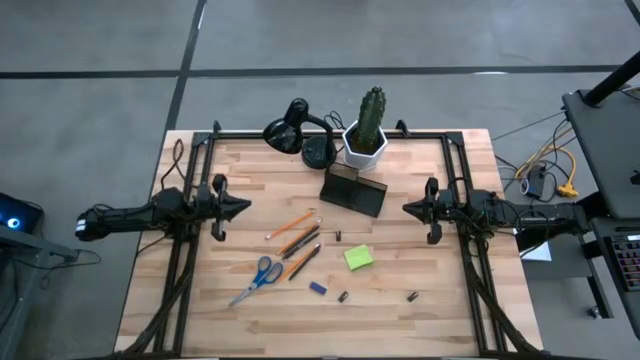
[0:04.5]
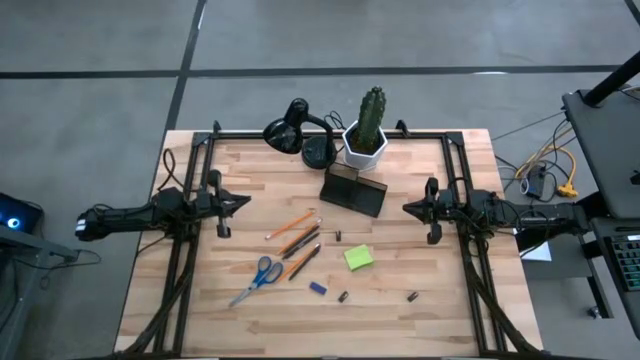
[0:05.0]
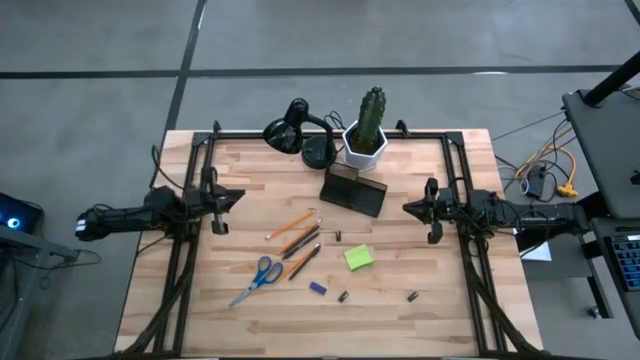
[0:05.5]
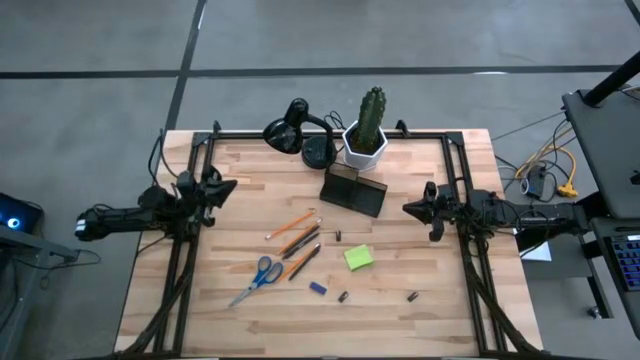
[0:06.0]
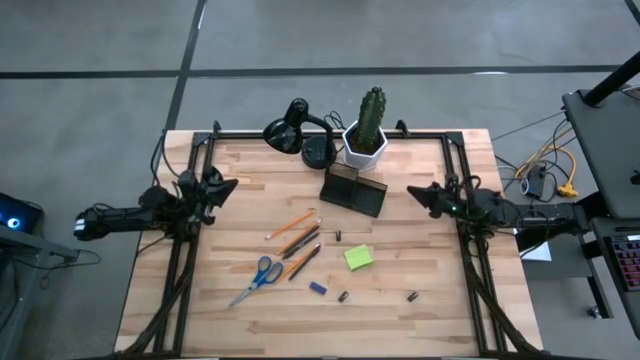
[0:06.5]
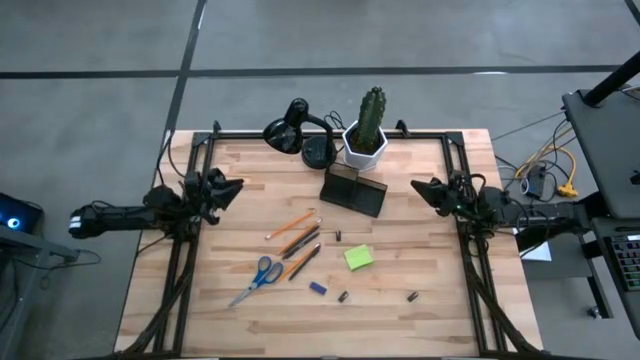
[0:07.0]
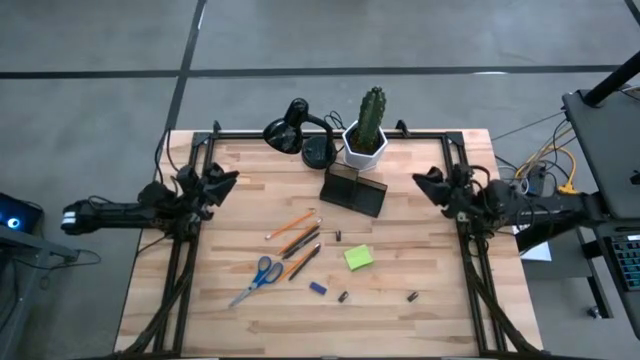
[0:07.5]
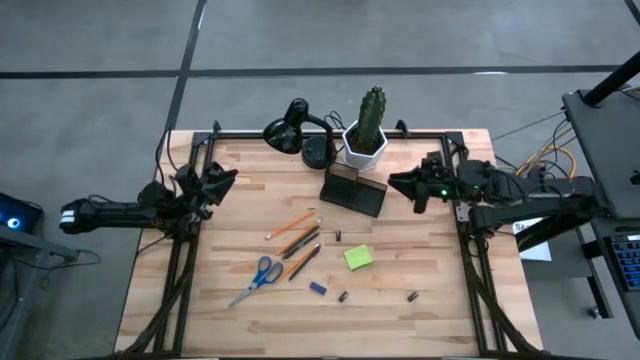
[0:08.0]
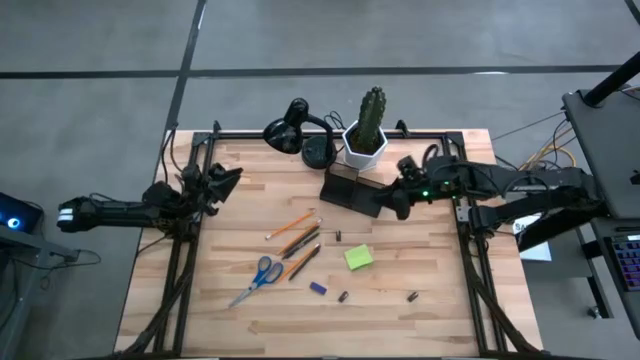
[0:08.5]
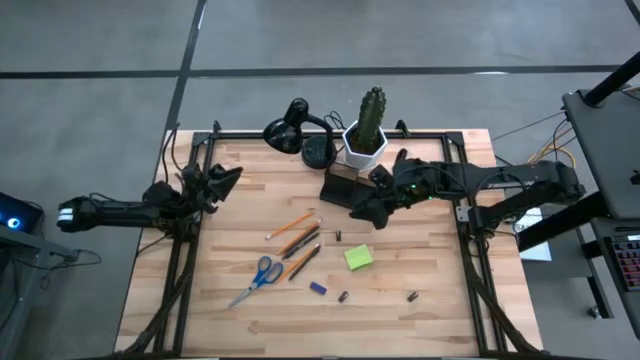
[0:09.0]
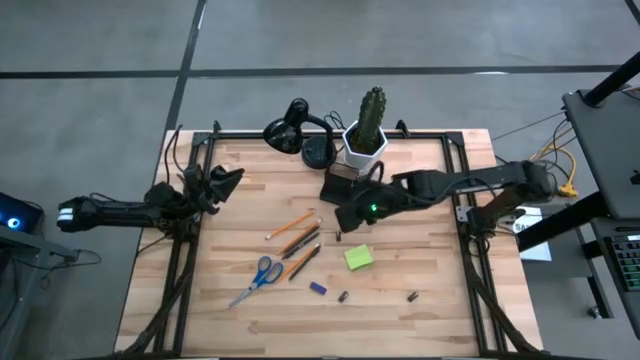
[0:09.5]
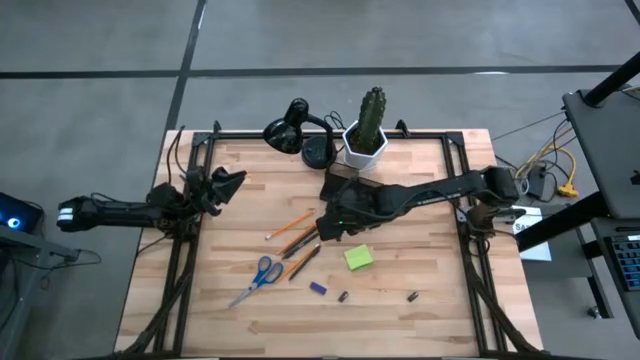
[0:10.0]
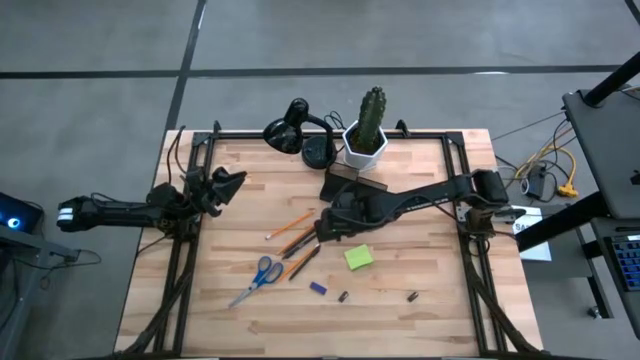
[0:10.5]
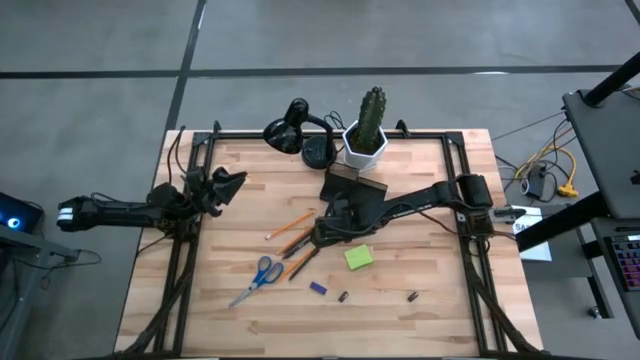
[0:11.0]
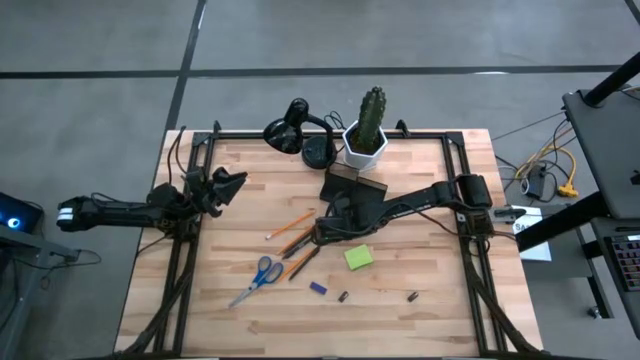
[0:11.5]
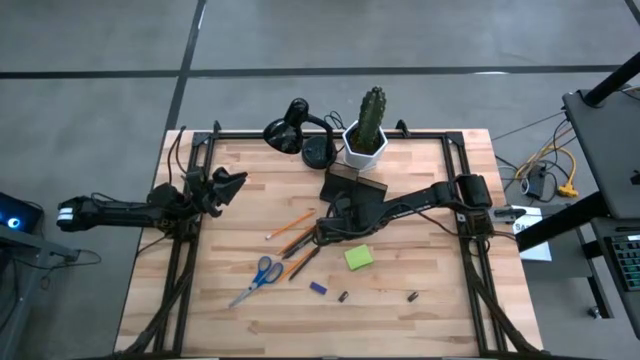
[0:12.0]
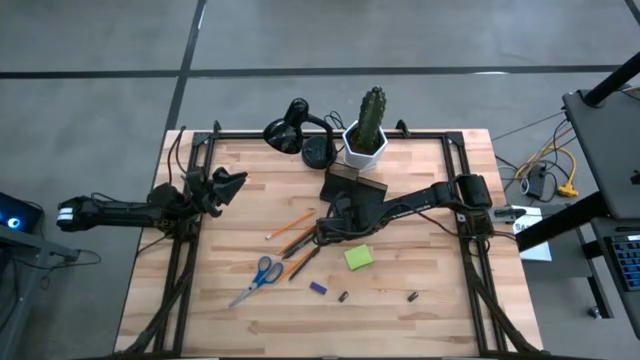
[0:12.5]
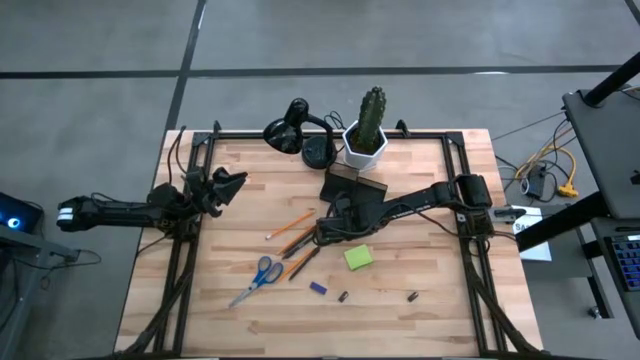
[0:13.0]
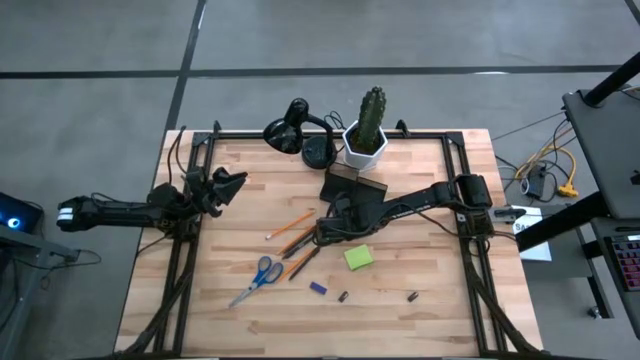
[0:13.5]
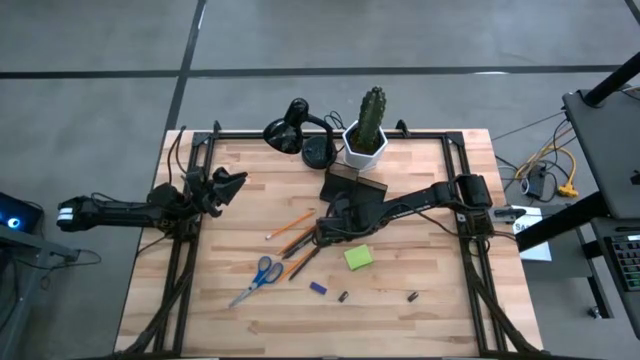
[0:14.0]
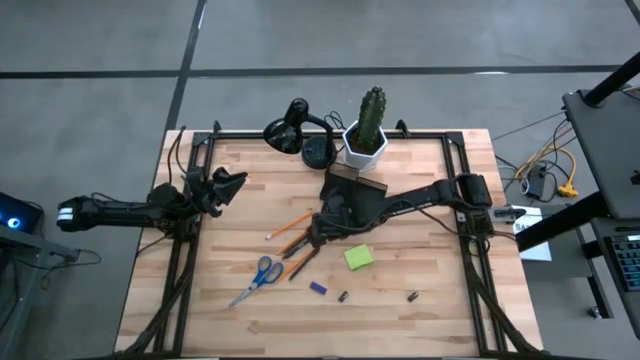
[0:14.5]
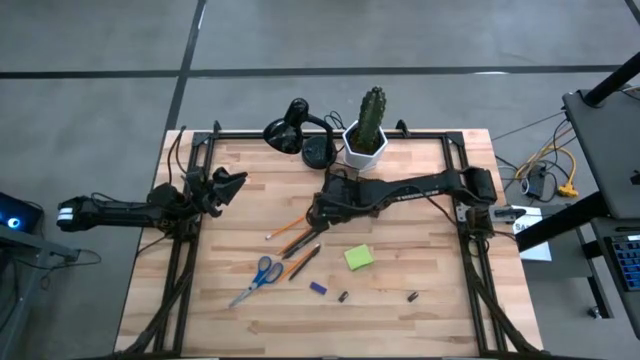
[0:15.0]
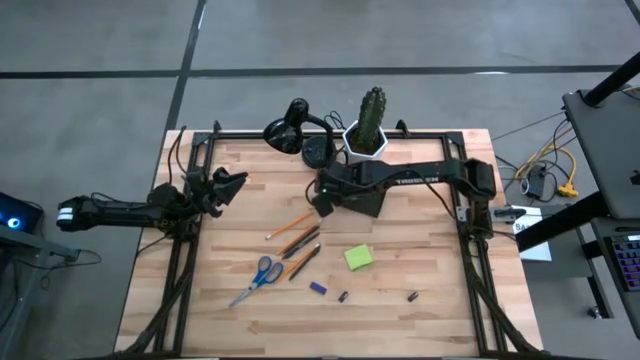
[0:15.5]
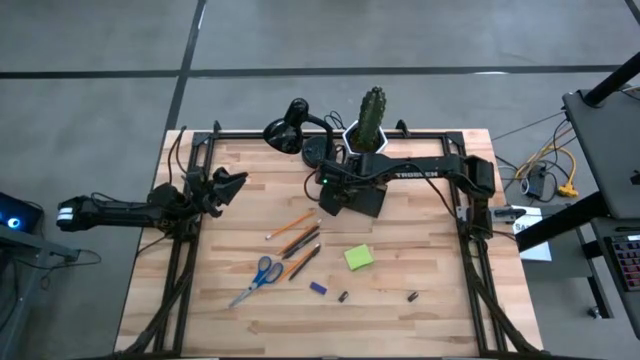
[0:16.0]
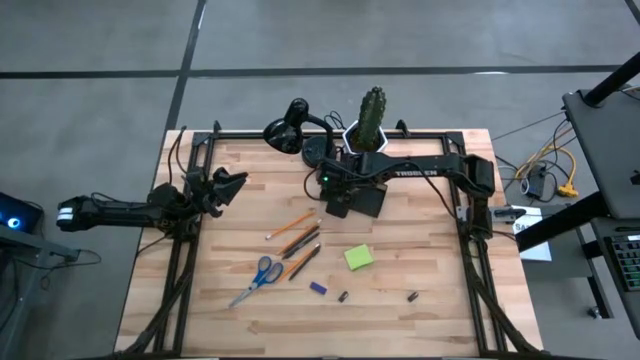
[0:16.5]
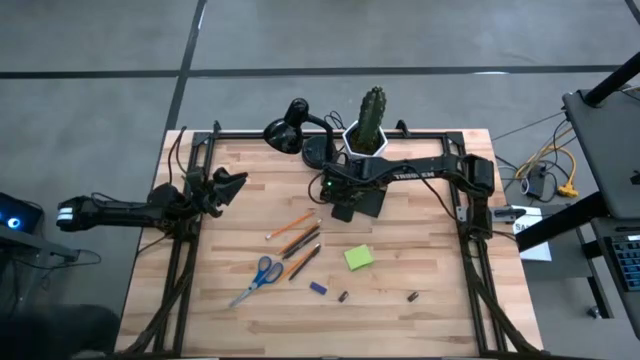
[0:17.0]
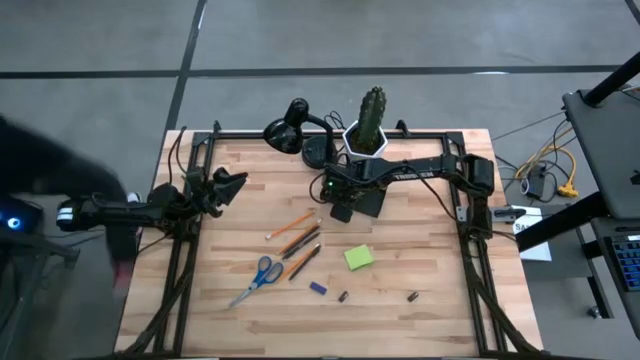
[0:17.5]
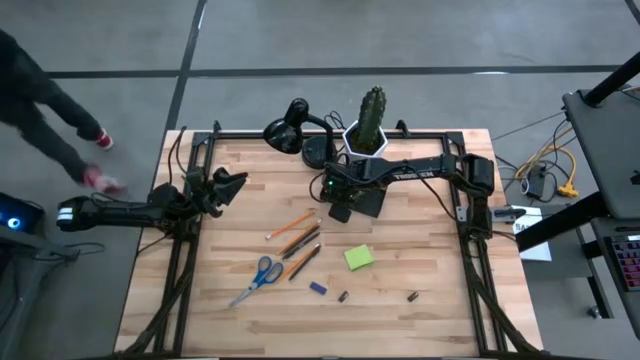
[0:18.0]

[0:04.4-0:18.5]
Task: Pick and place office supplies into organizer
Put the top black binder clip into the black desk organizer

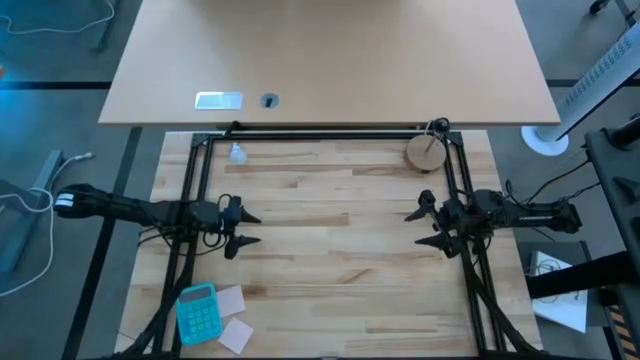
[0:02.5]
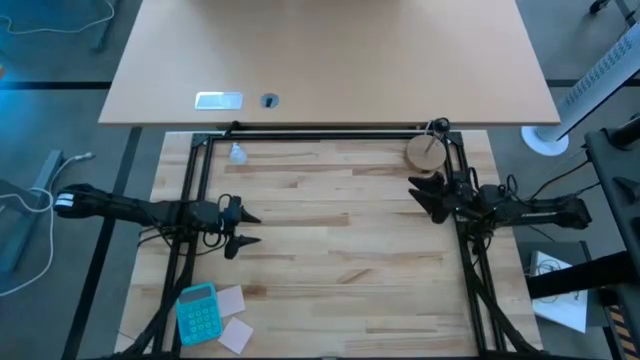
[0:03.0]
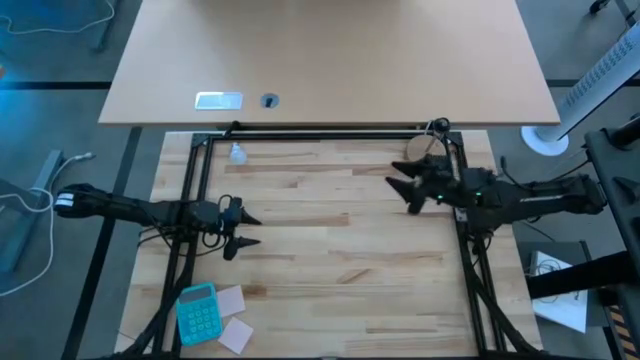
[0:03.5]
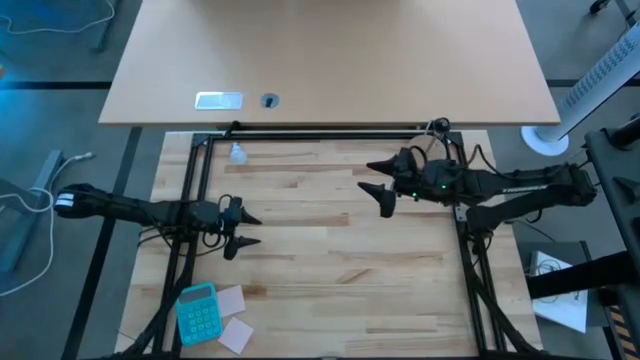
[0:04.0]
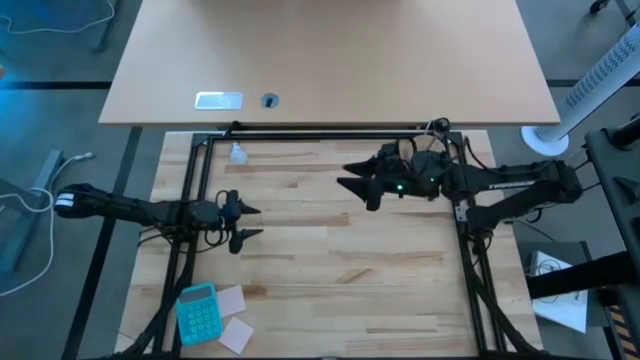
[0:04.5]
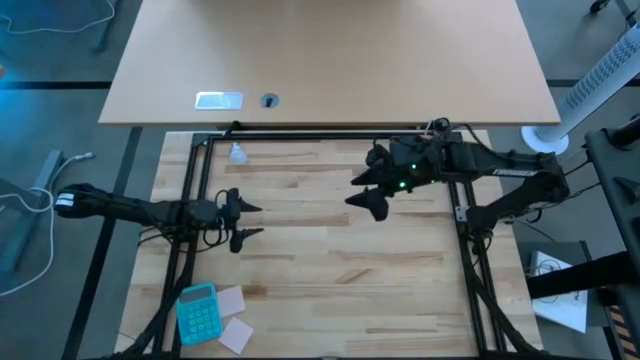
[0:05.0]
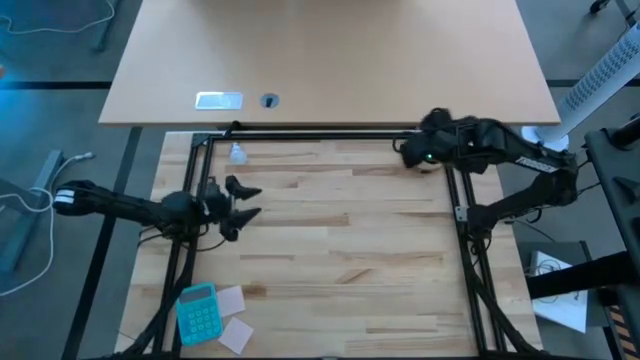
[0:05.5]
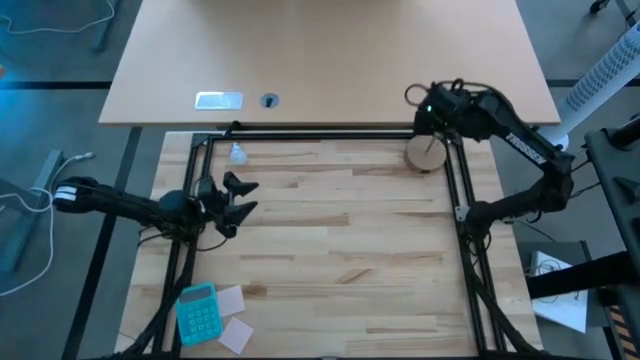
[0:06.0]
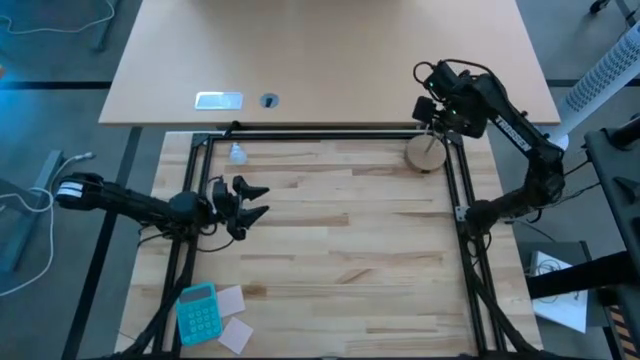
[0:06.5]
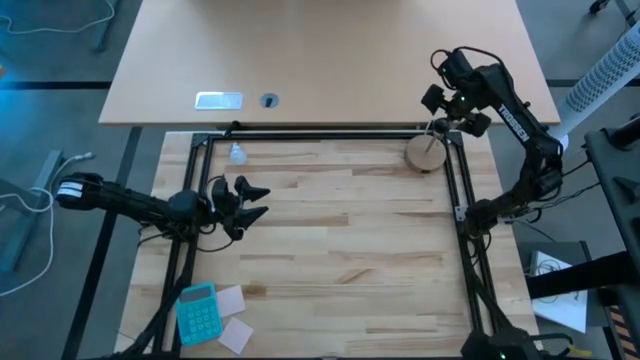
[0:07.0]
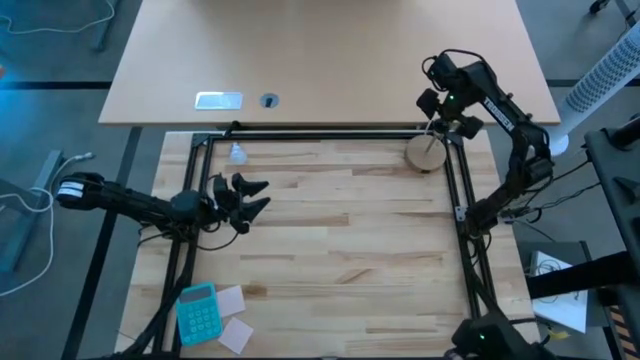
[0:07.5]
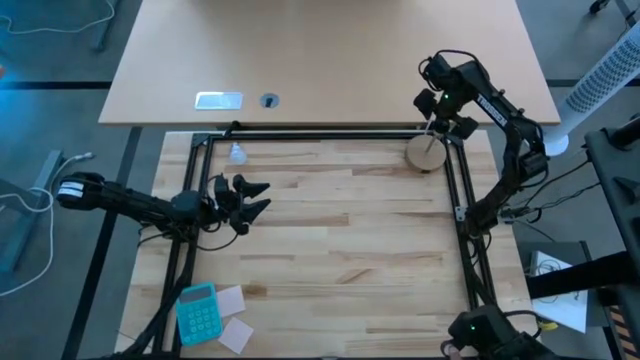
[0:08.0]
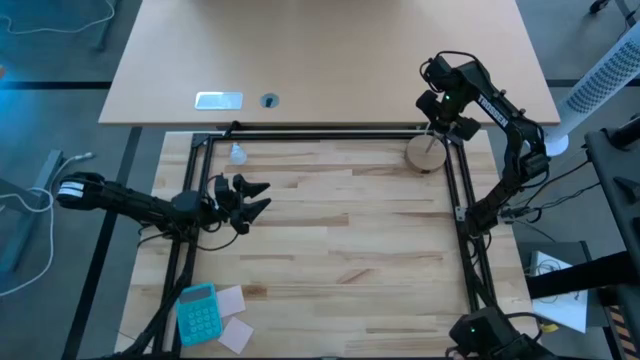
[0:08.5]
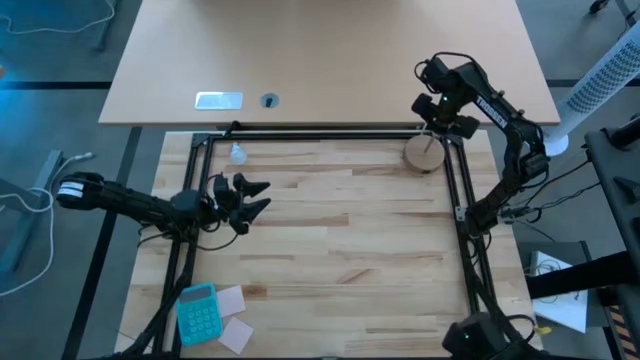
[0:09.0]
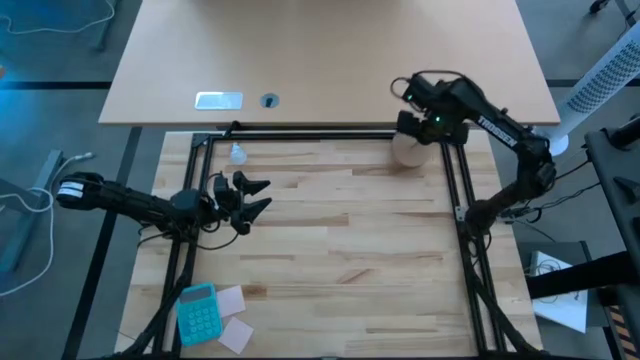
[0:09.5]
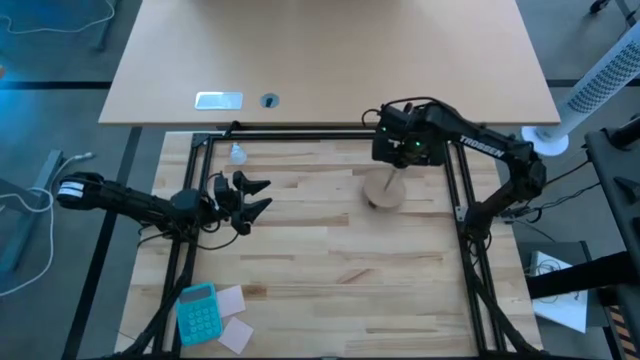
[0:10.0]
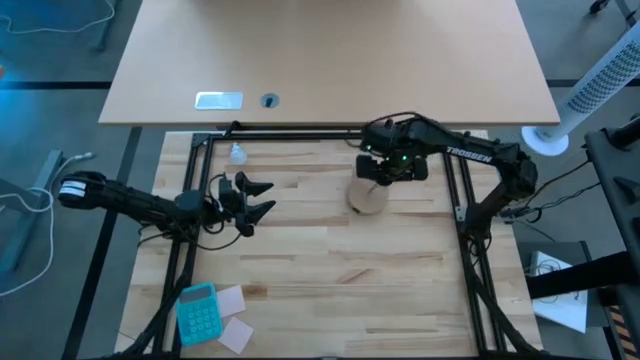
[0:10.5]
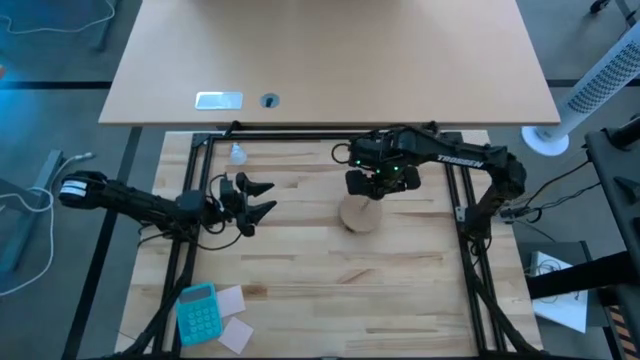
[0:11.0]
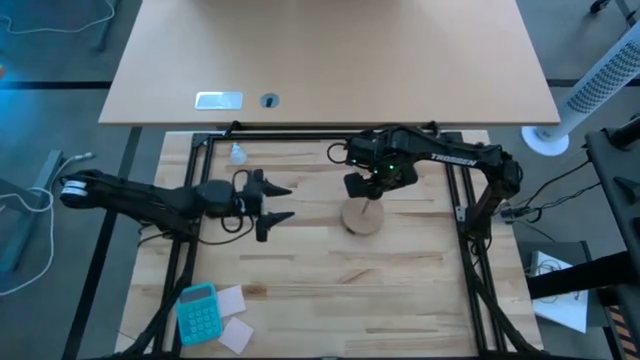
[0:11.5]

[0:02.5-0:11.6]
Task: Screw lightbulb
Move the lamp from top right to the center of the table
